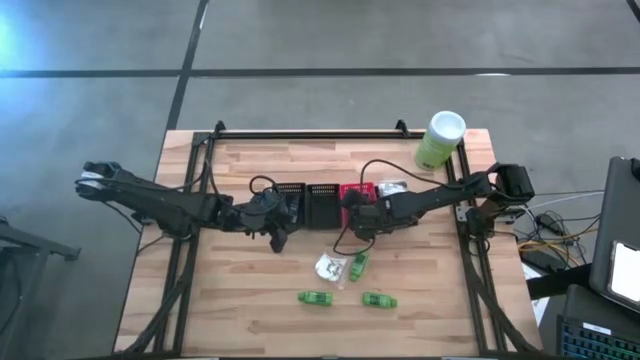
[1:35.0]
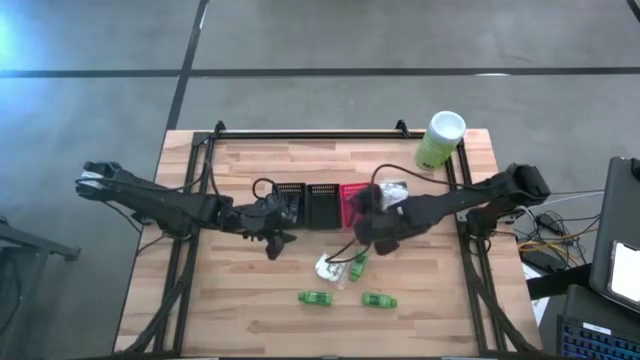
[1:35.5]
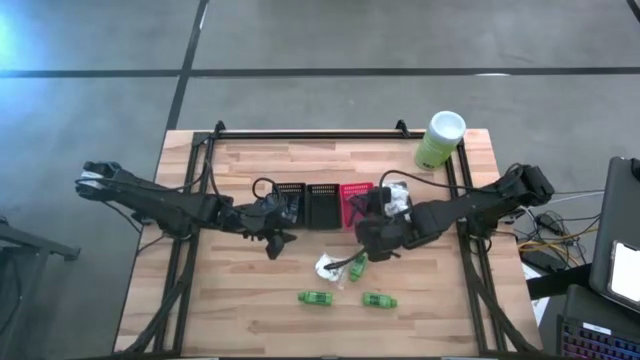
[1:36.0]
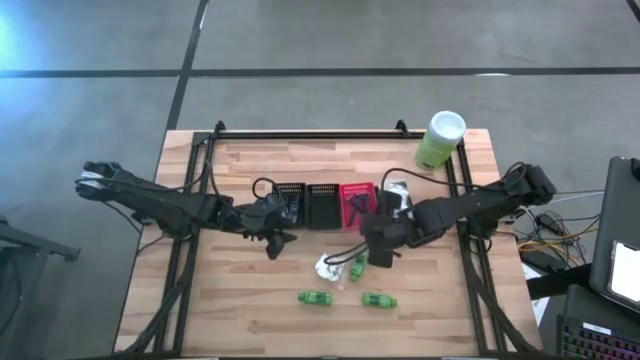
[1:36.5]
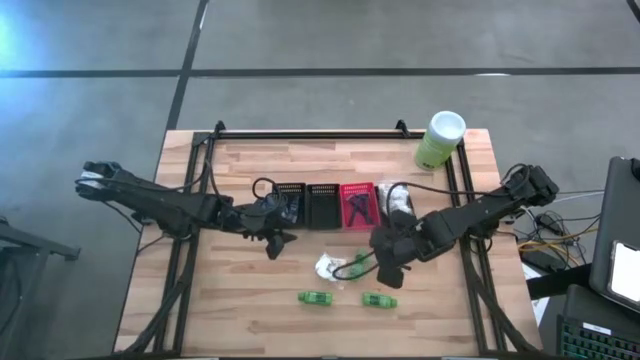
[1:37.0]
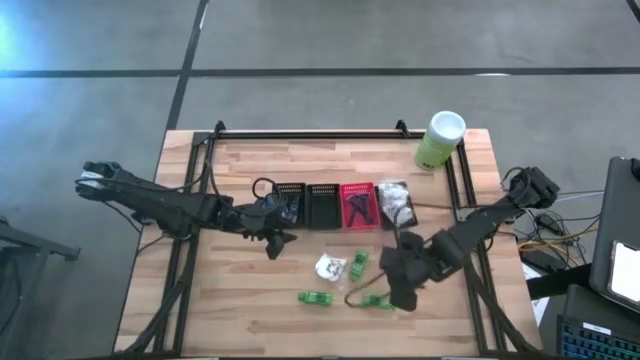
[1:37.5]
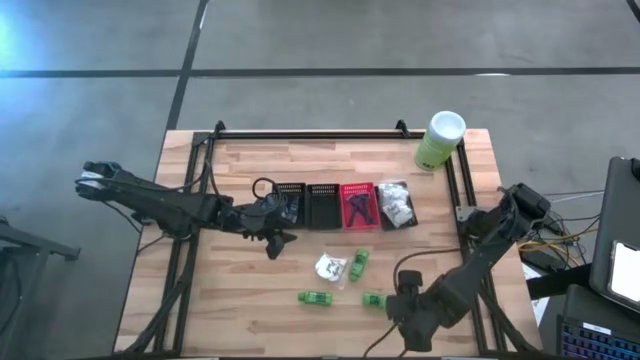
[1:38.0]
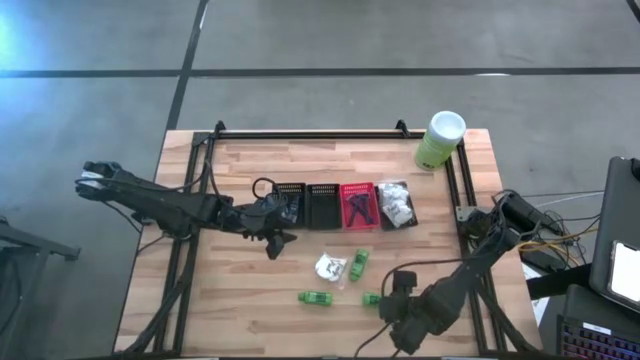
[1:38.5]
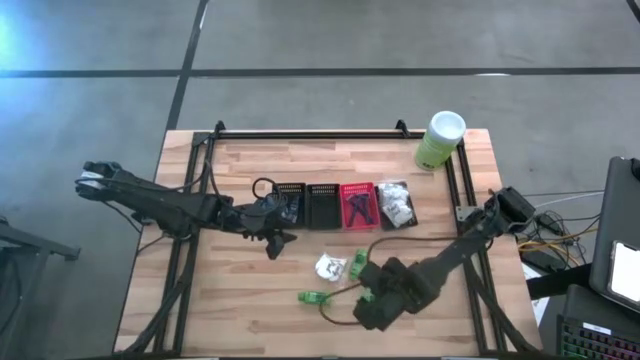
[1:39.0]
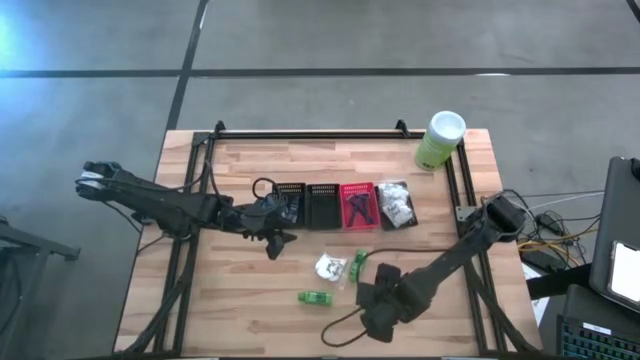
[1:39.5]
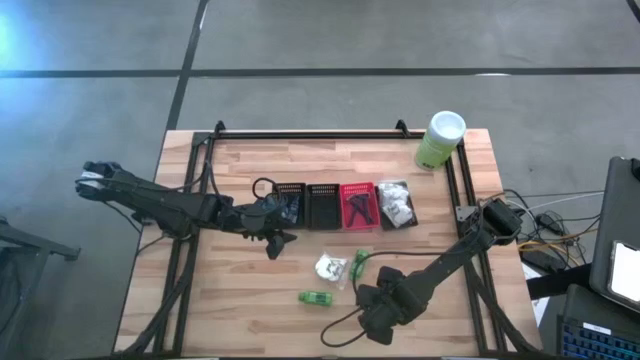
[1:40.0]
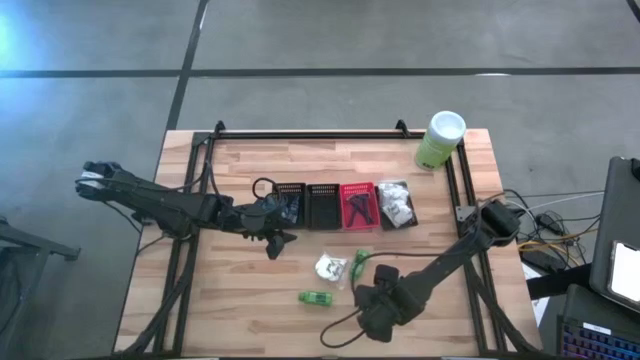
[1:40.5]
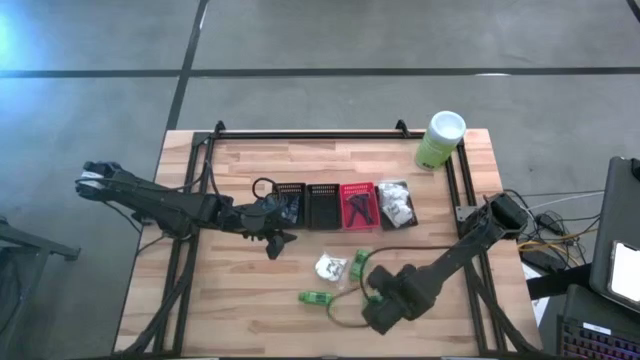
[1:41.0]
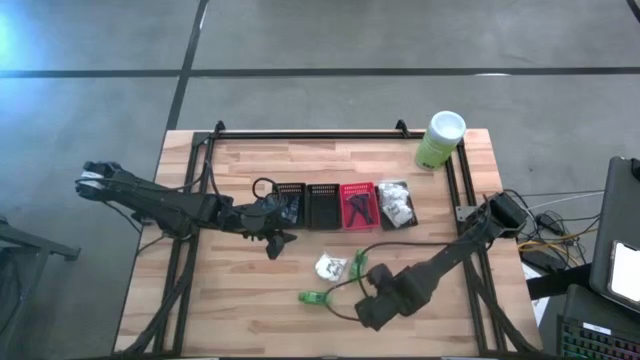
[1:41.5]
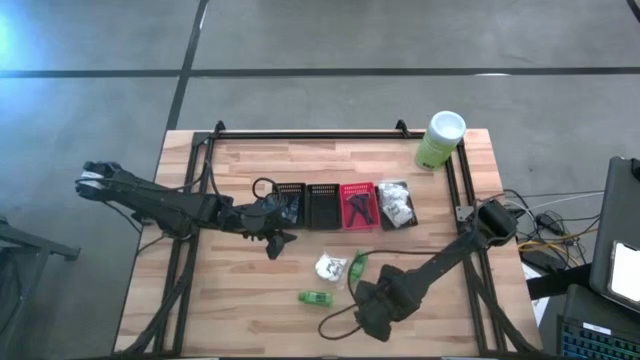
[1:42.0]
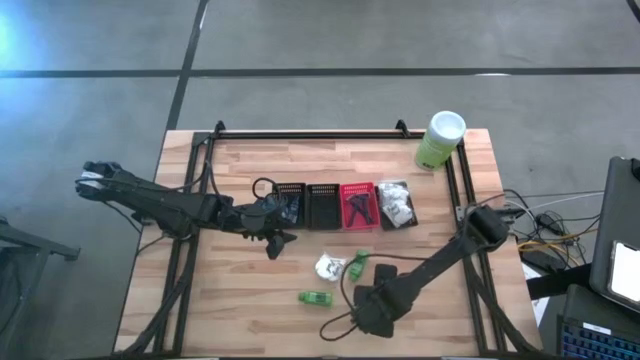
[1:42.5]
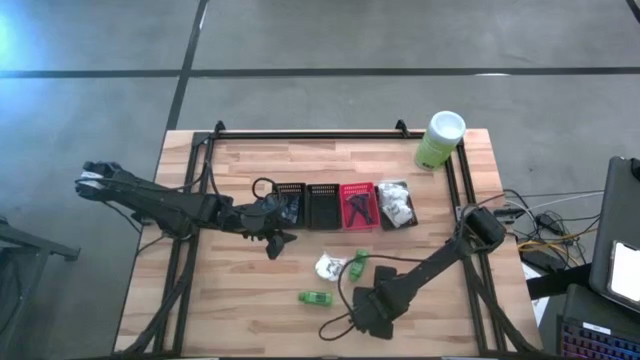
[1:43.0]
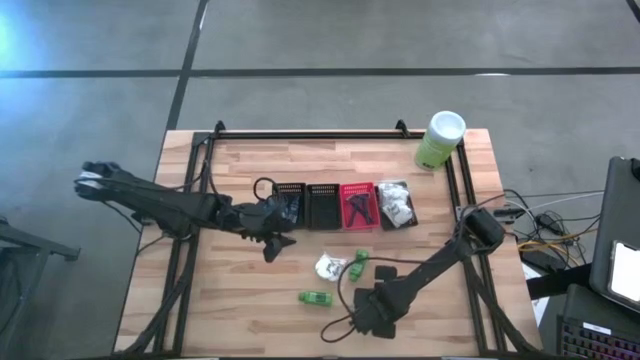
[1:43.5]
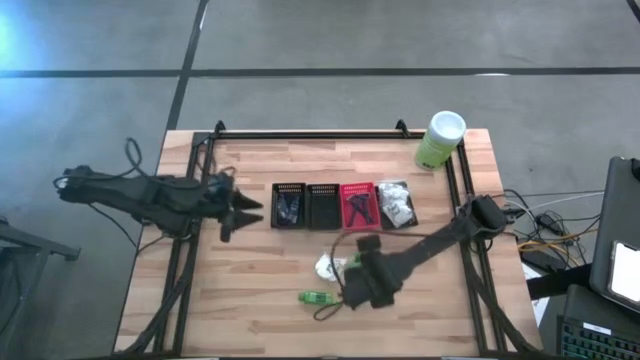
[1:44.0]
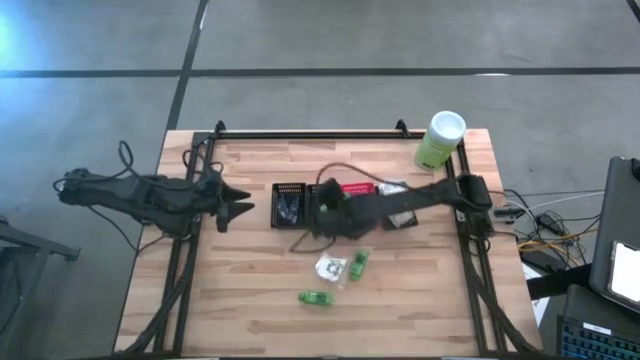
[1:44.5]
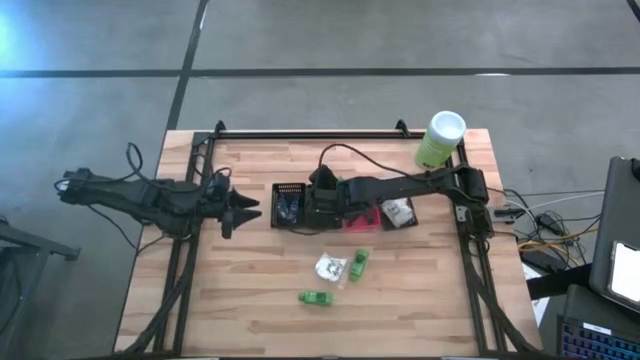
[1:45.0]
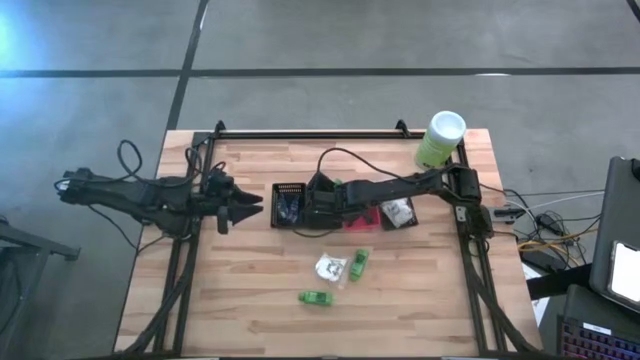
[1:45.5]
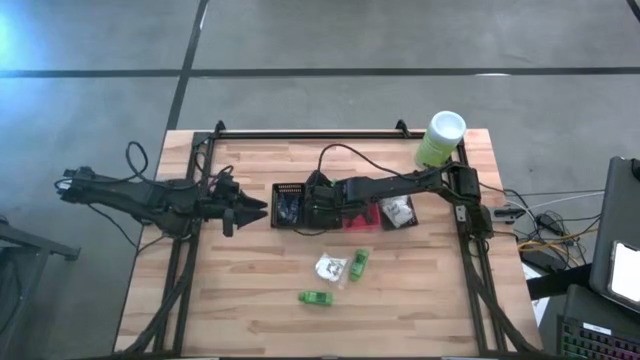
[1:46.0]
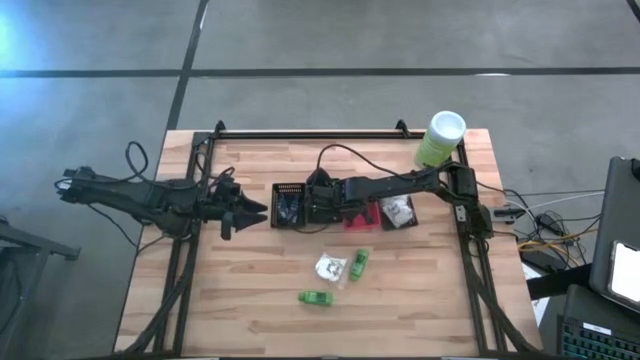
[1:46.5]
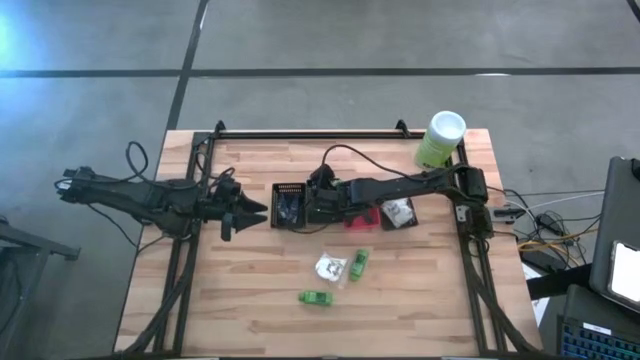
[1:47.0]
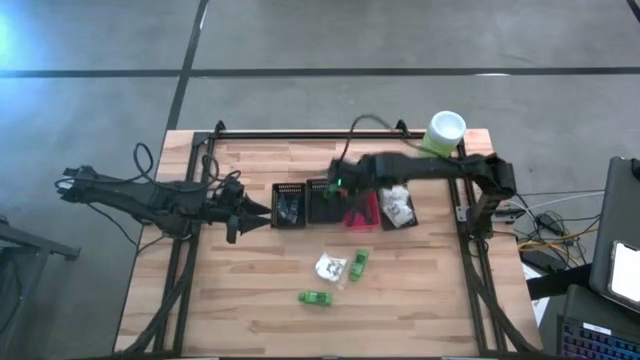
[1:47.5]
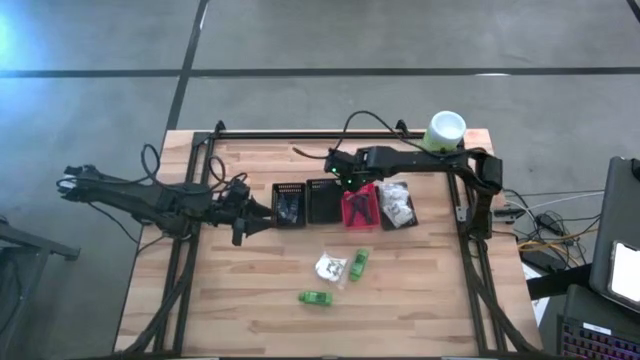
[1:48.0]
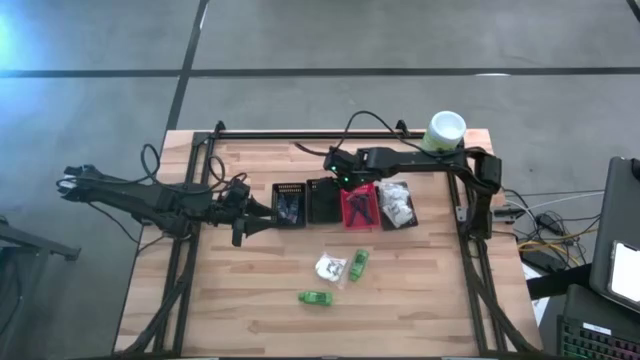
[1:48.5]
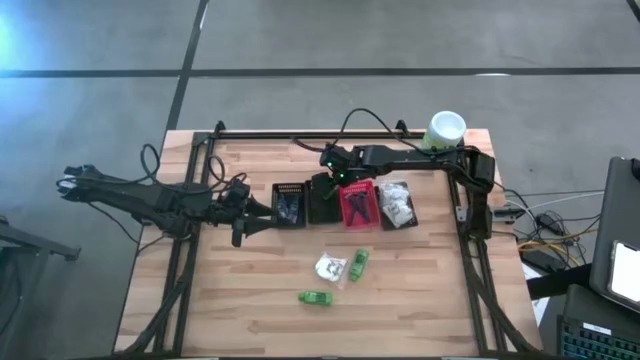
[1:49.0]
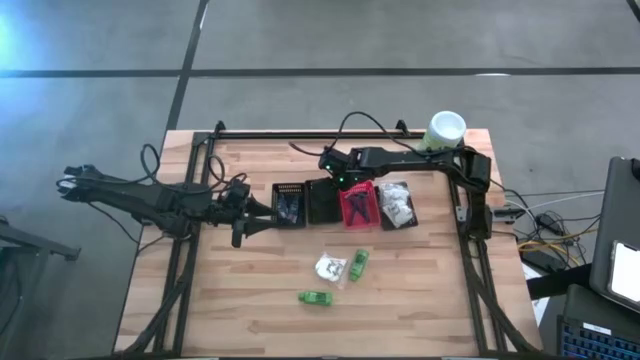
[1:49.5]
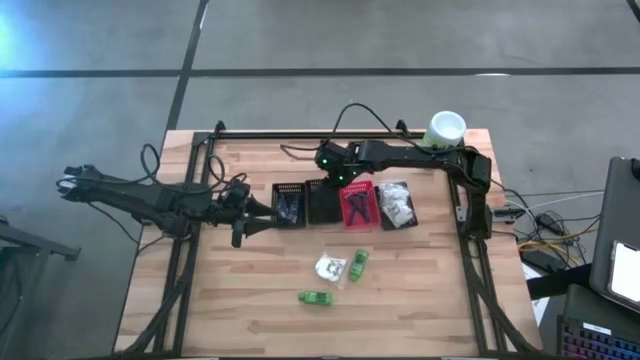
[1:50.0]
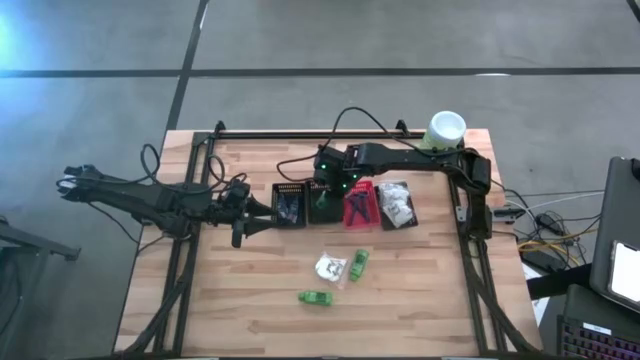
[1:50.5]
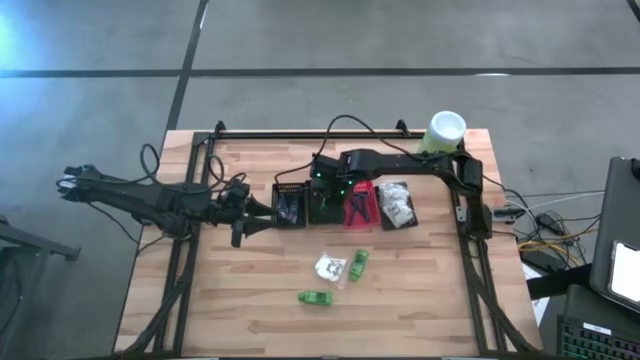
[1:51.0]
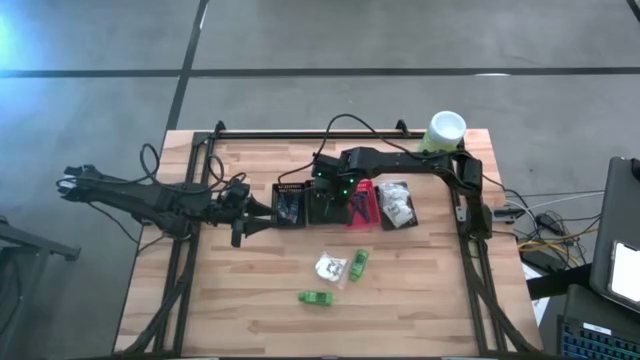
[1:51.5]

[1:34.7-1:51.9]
Task: Pick & Place Travel size toiletries
Put the green shampoo into the middle black basket

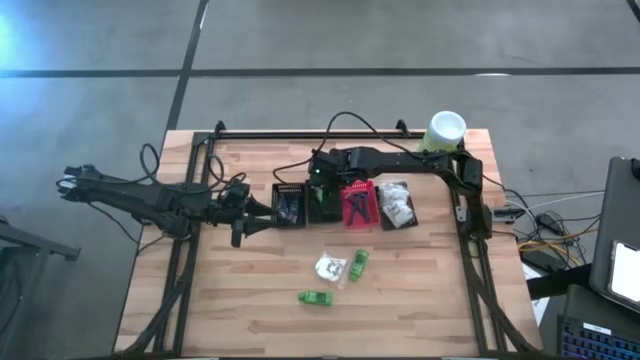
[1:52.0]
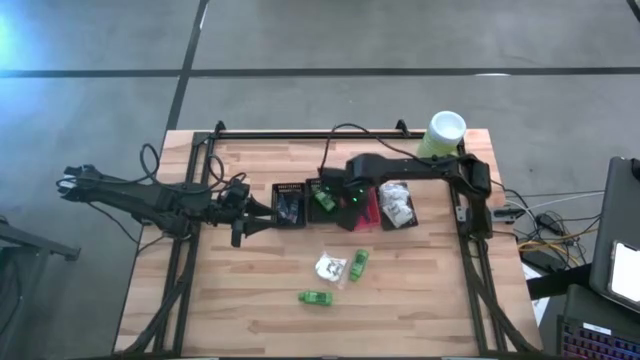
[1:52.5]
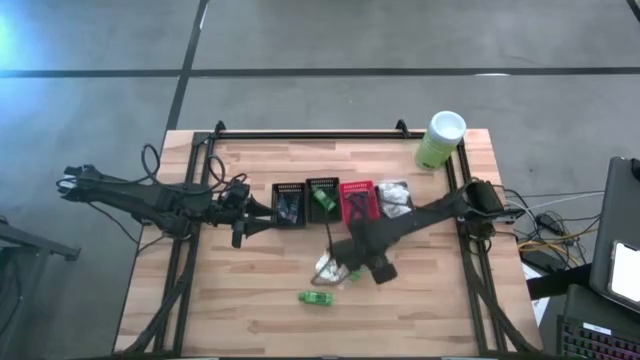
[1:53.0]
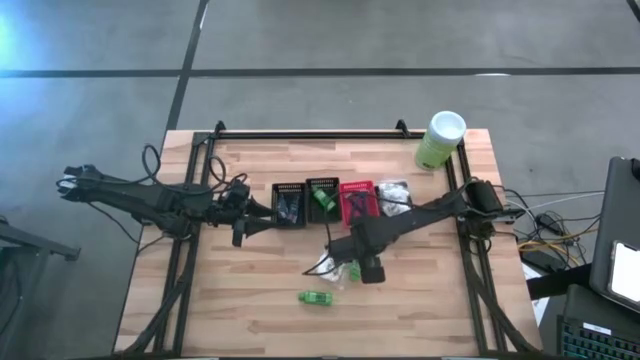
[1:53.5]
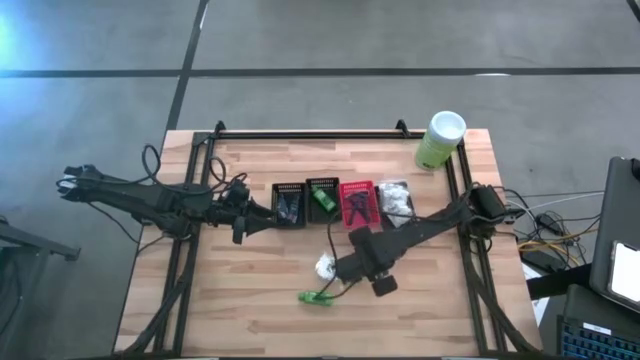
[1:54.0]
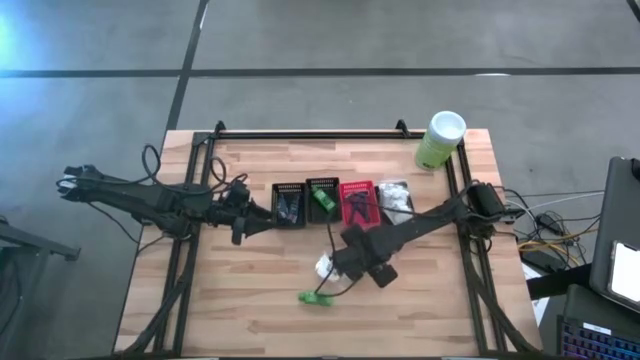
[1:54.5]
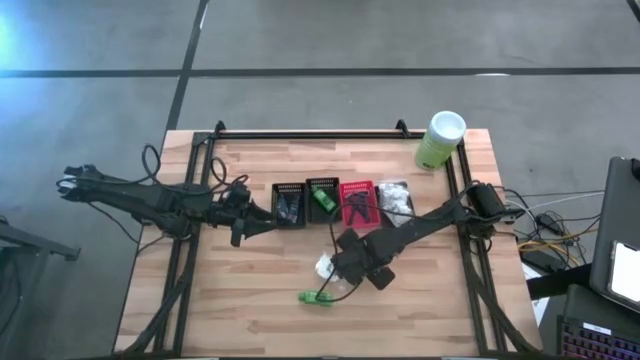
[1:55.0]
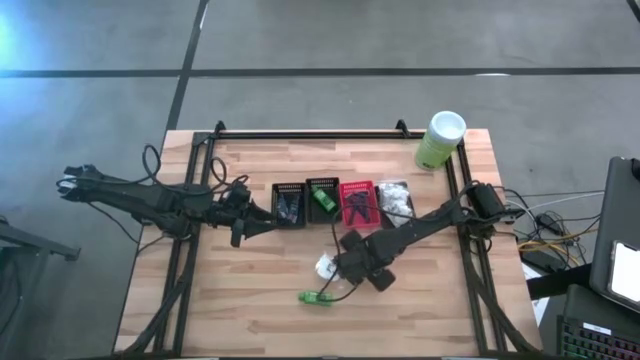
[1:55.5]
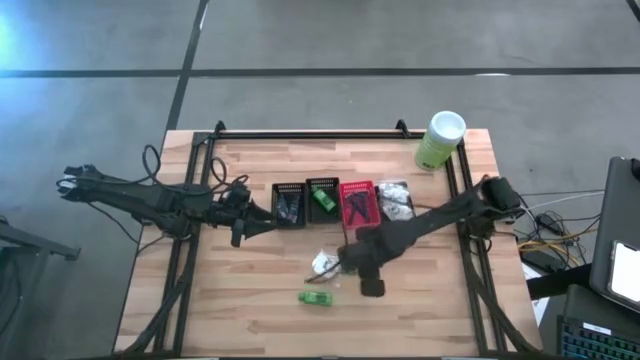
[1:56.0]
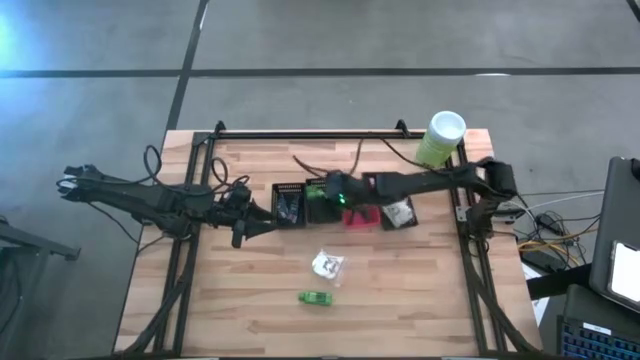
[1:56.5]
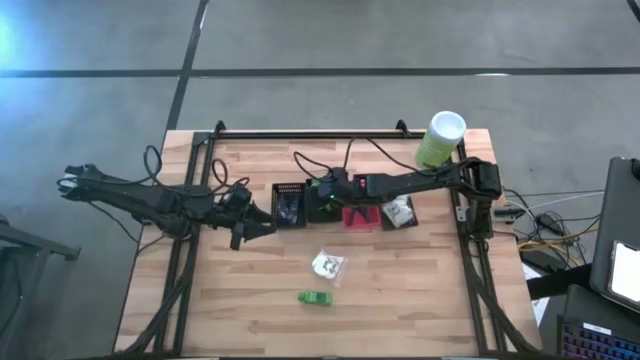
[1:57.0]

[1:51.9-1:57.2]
Put the green shampoo into the middle black basket
